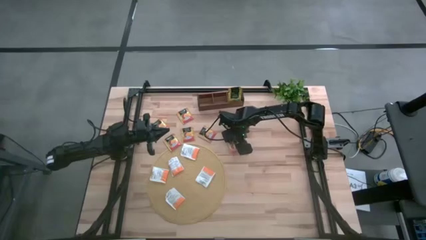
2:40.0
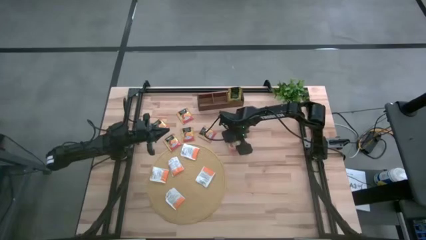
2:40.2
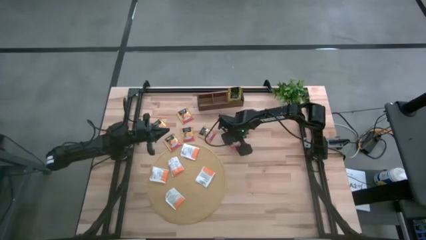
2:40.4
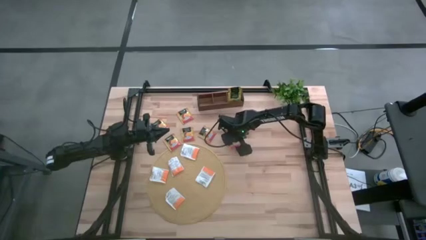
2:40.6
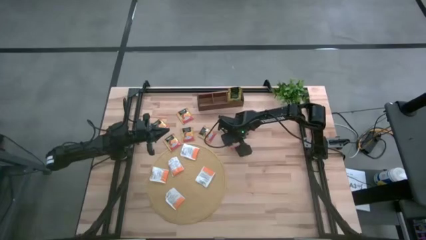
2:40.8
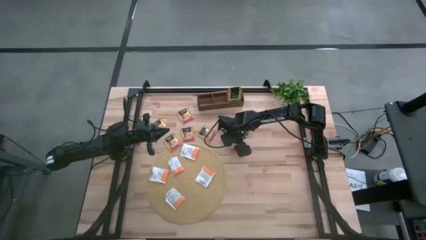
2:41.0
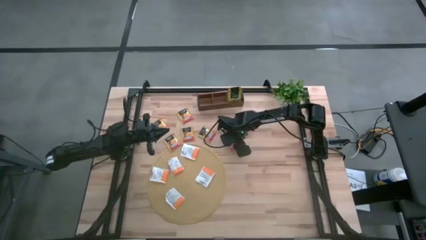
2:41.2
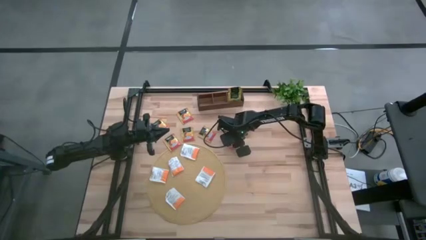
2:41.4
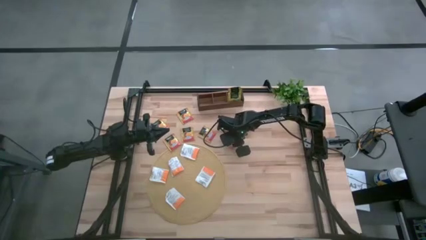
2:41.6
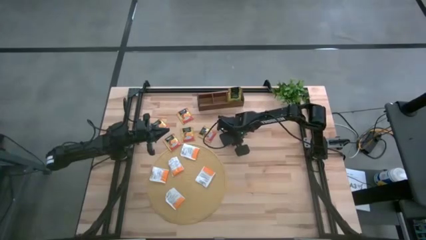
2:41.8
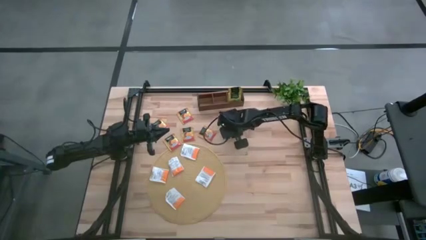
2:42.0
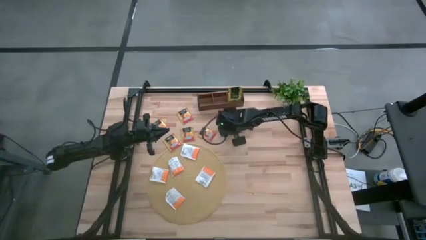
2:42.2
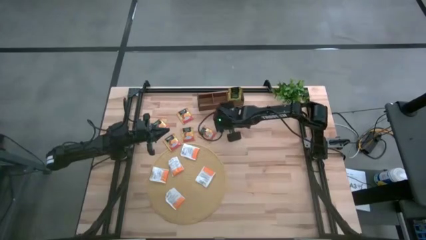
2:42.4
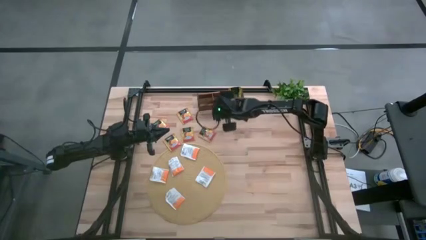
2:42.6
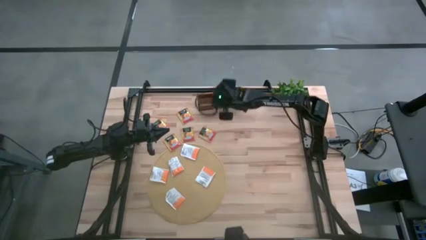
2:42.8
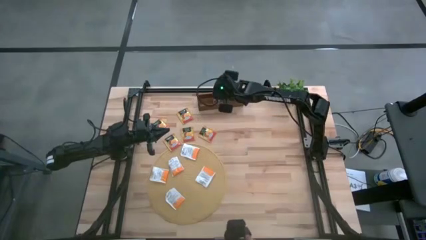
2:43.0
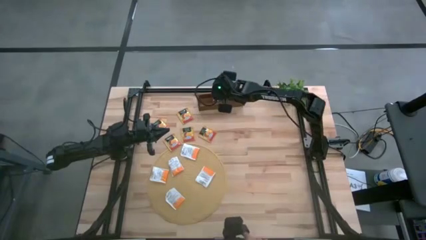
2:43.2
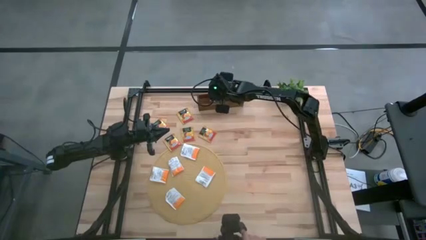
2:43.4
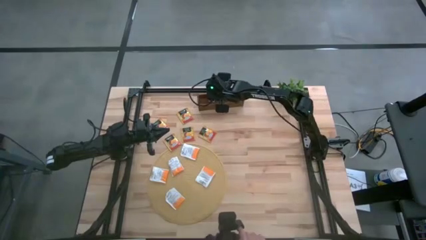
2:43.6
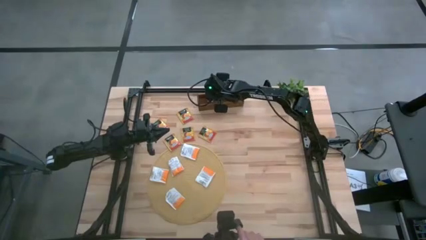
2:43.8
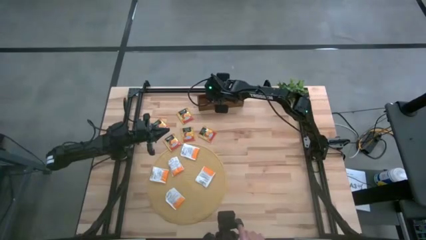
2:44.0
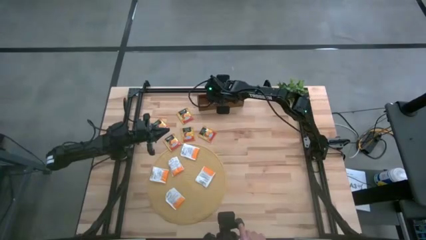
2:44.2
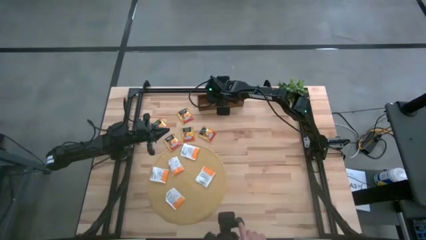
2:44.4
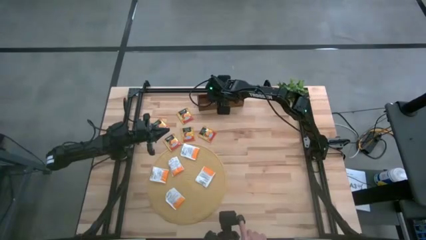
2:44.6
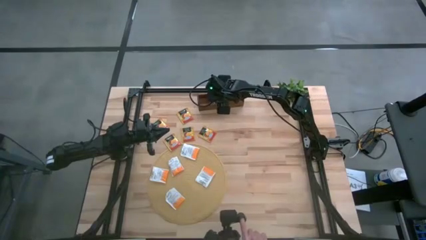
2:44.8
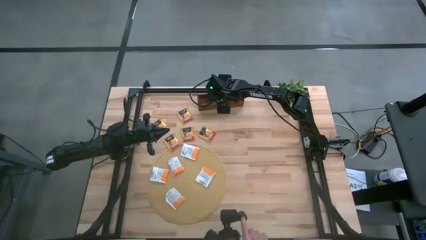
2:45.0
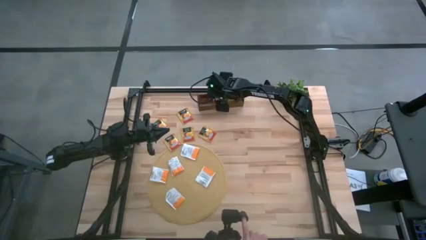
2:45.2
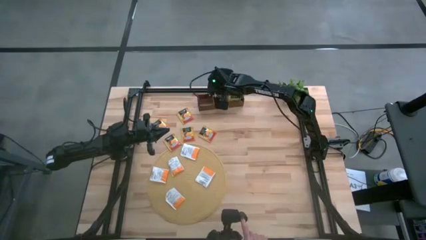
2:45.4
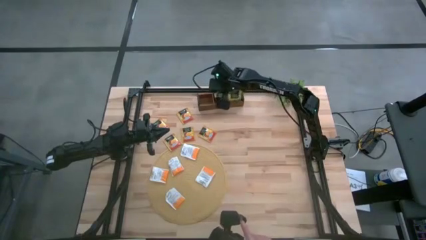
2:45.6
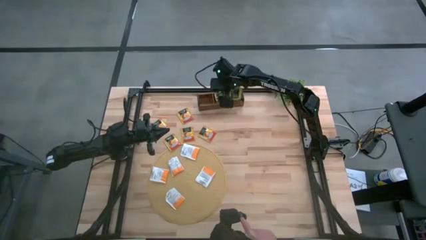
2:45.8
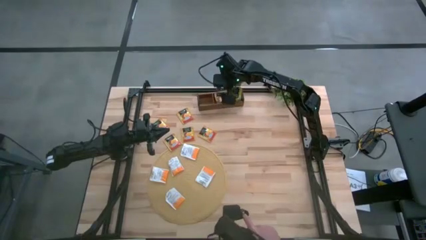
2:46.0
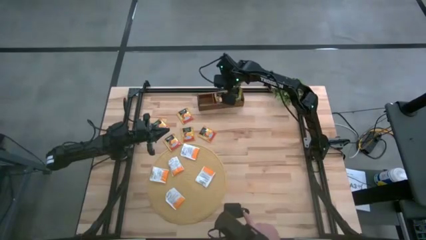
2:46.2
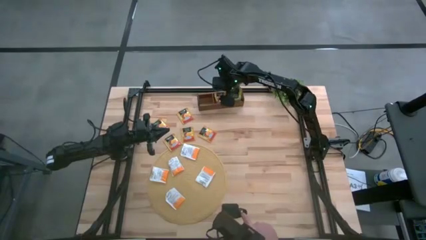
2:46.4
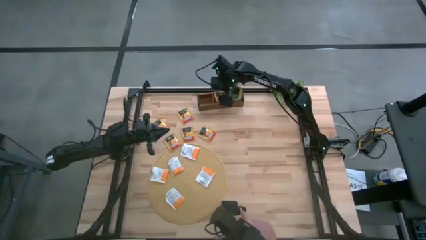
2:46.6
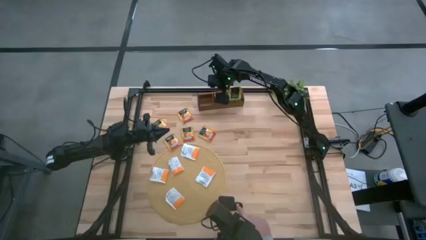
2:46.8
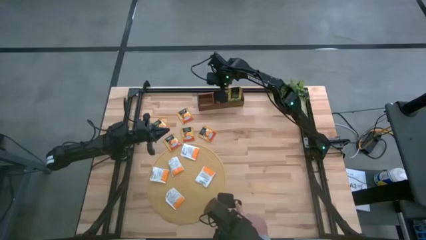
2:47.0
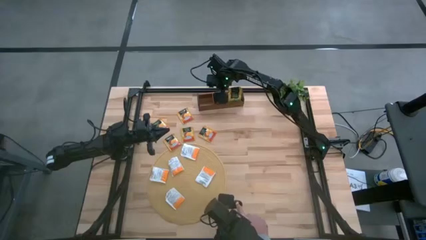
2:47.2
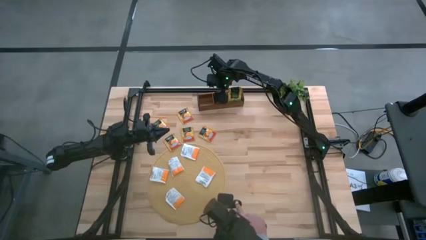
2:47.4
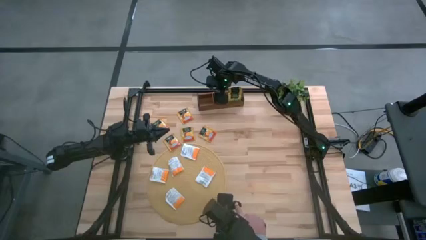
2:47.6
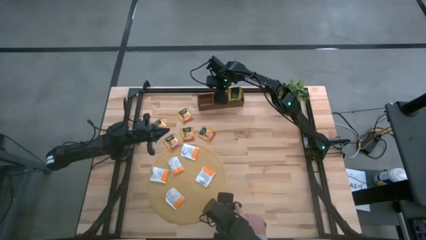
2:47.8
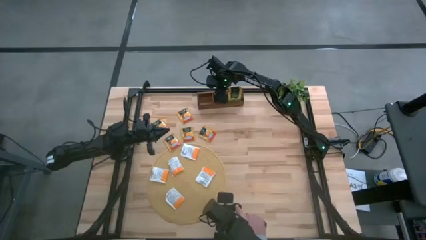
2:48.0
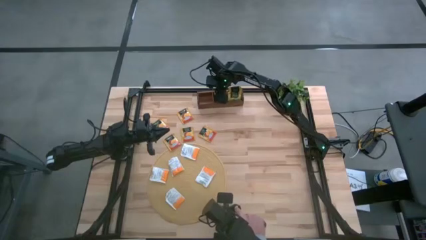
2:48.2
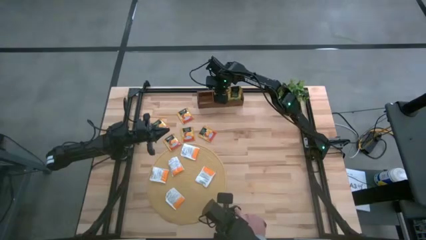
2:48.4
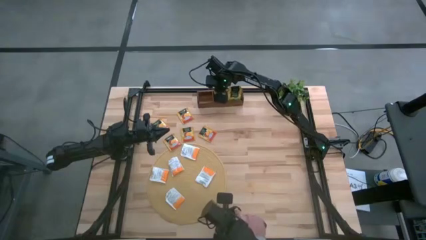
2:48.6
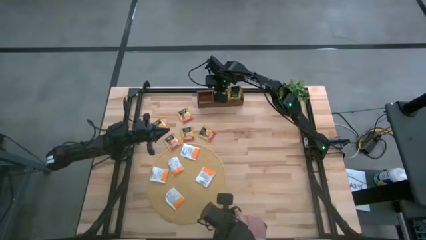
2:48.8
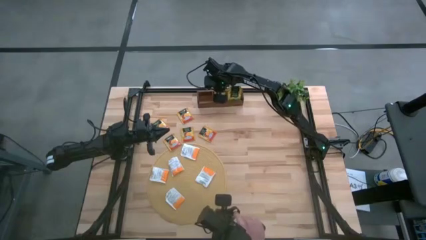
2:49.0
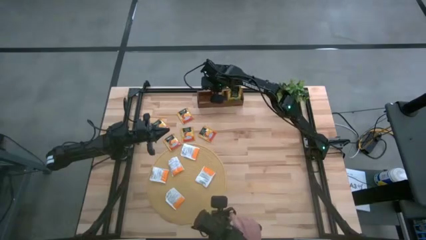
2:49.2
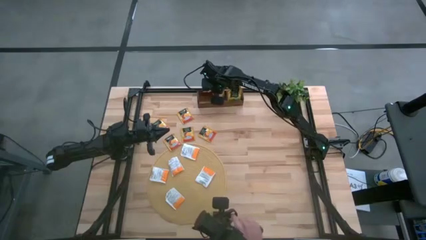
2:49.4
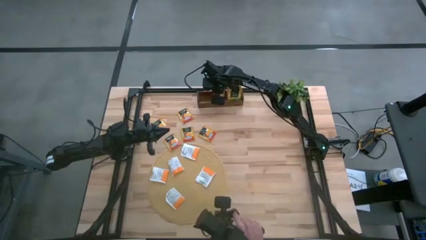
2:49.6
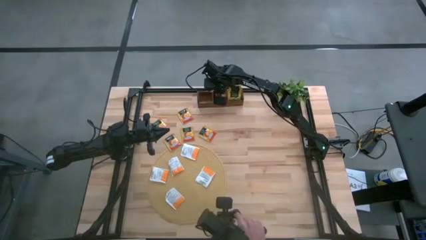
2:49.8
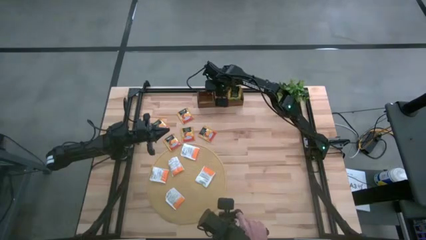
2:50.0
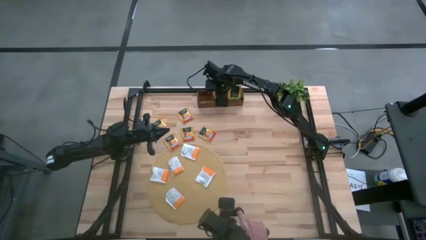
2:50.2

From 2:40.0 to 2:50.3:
Task: Pick & Place Tea
Put the yellow tea bag into the middle slot of the wooden organizer

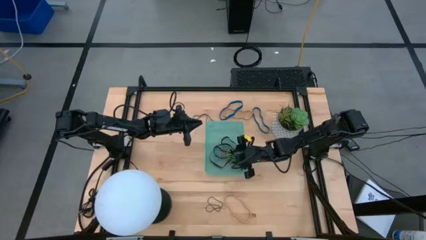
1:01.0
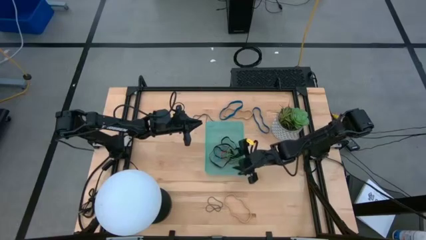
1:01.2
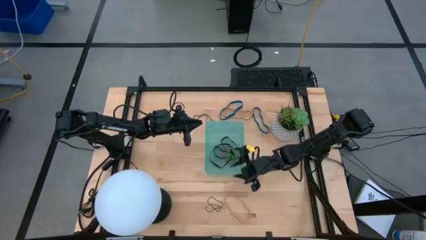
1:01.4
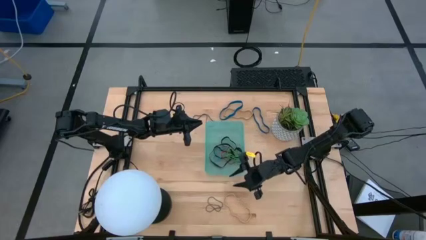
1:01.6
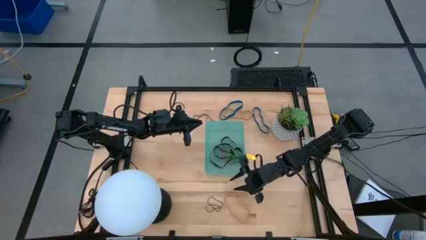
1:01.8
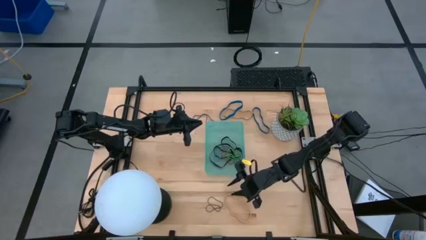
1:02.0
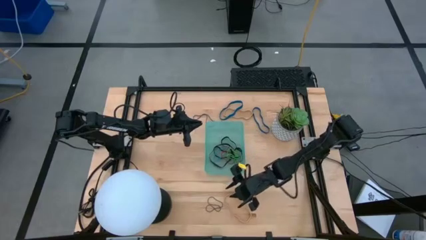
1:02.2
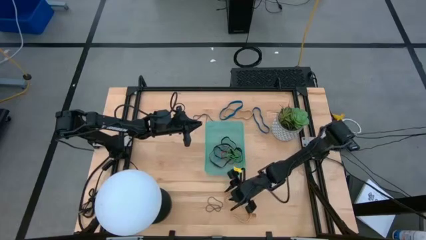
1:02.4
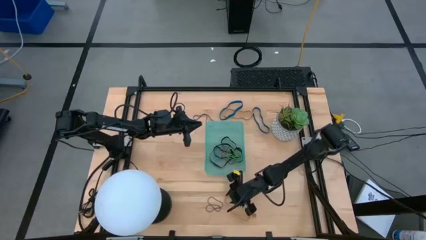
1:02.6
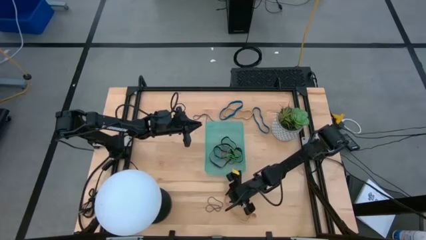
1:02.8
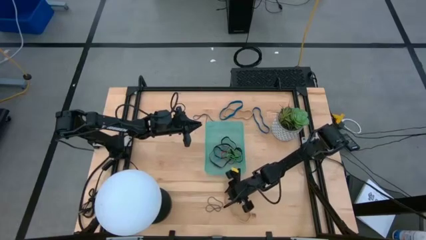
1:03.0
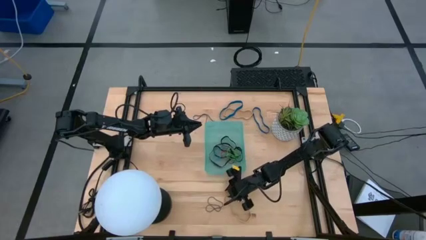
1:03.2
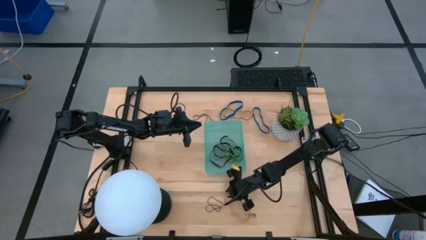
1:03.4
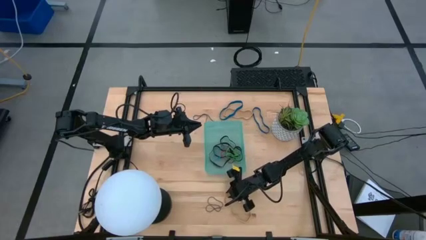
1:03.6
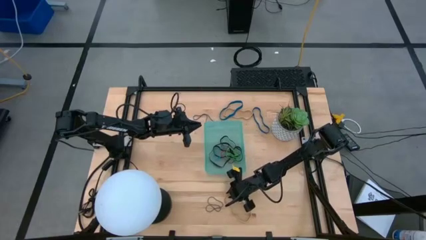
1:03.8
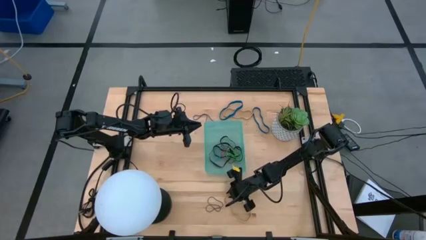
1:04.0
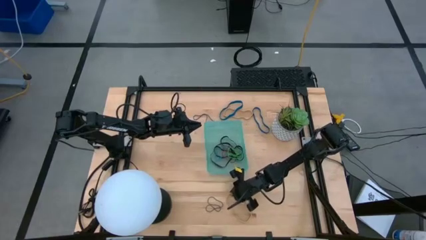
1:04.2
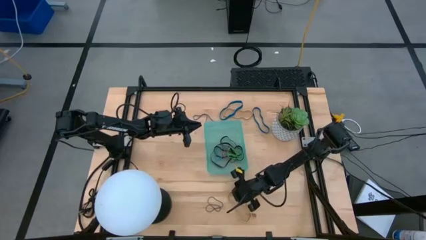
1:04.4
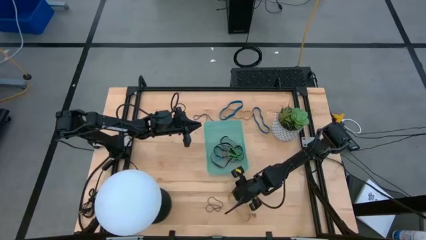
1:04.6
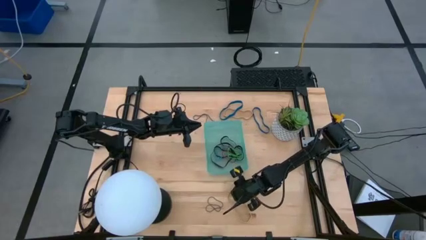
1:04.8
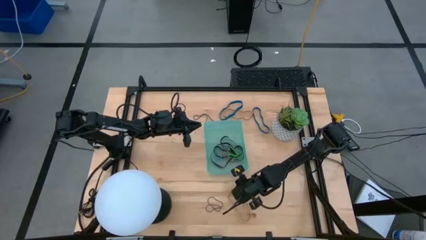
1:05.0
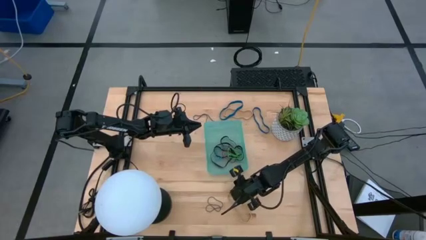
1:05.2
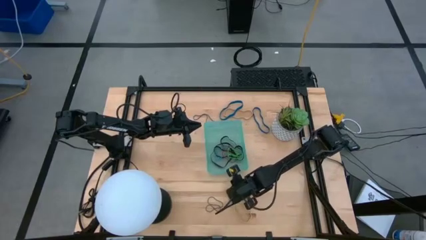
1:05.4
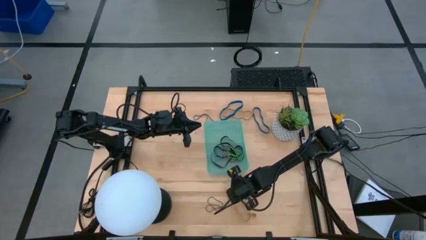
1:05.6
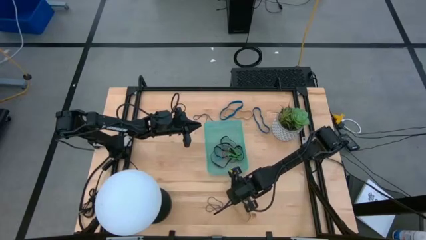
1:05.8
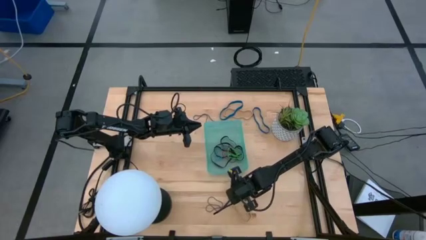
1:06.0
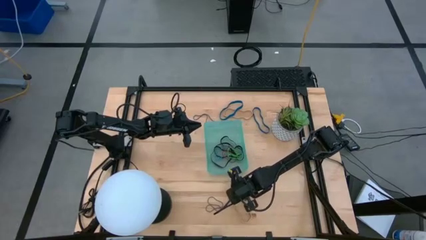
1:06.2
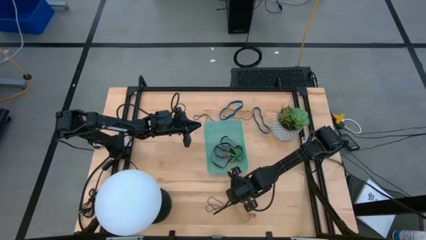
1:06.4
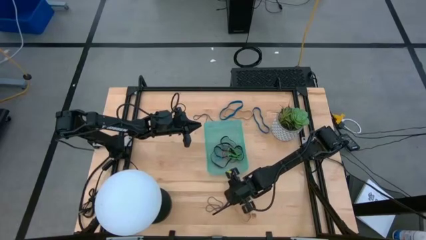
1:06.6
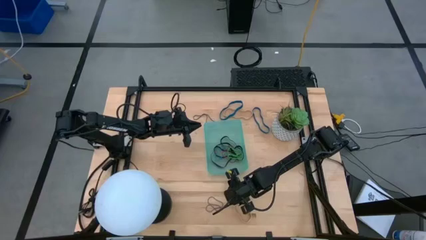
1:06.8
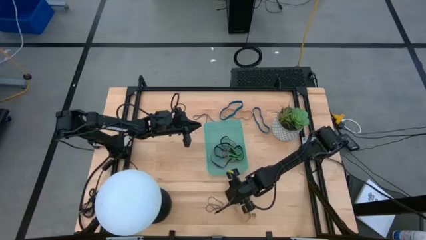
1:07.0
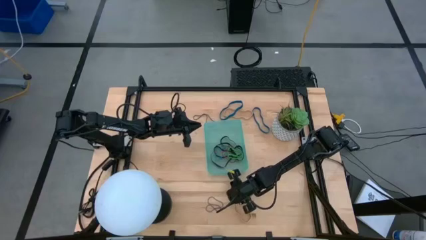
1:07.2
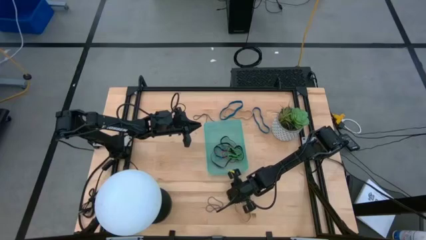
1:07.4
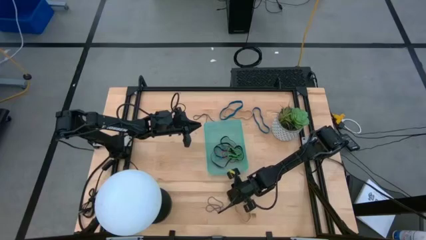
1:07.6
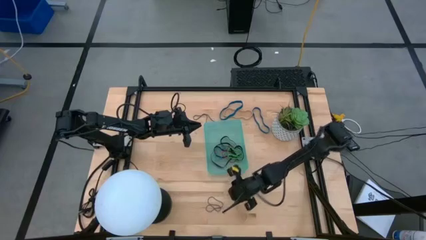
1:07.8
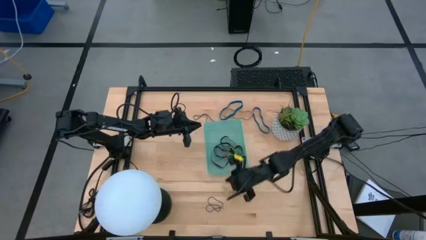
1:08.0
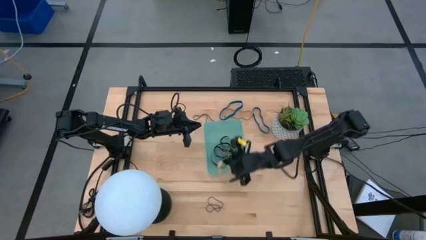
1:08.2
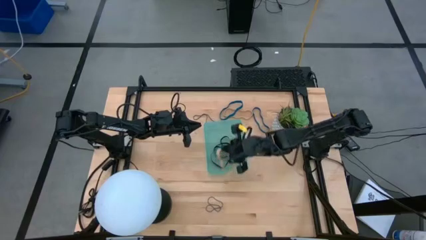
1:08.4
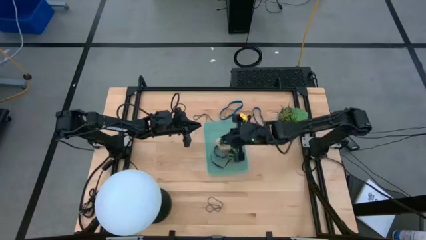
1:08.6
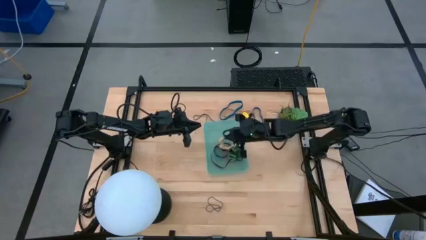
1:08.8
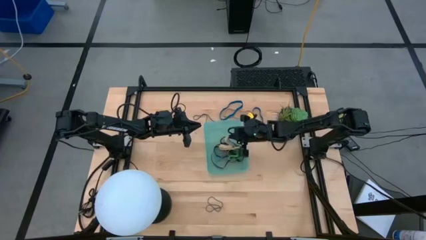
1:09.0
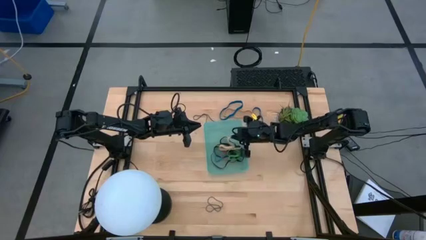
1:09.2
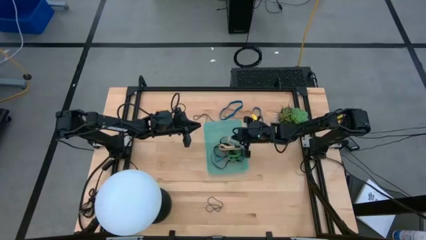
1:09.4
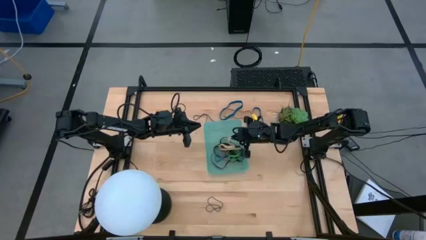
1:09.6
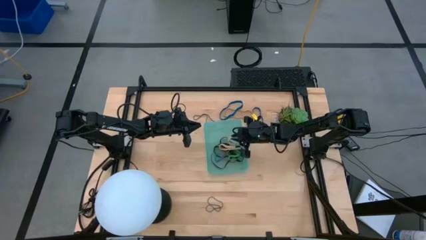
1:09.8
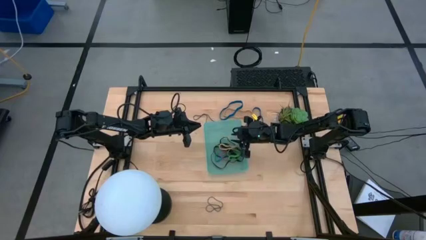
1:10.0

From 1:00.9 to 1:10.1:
Task: Pick and place rubber bands into bin
Put the brown rubber band into the green bin
